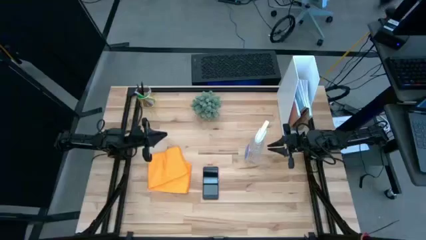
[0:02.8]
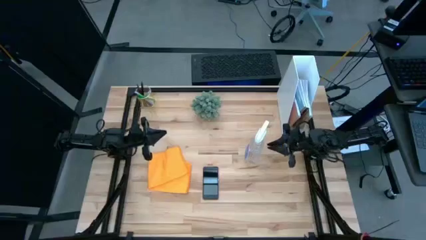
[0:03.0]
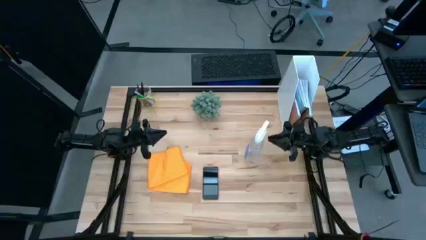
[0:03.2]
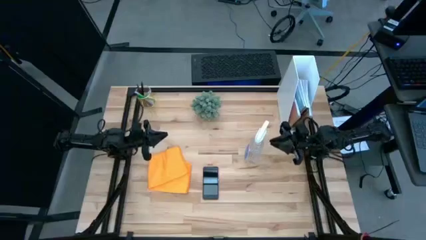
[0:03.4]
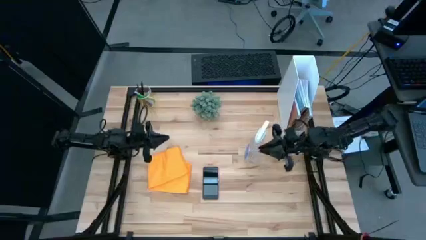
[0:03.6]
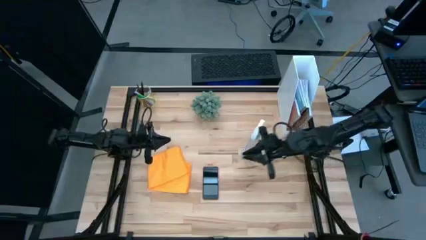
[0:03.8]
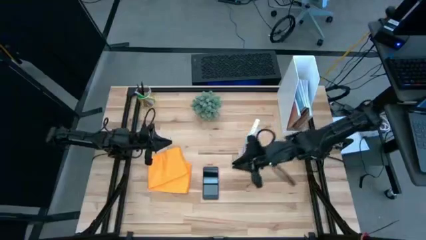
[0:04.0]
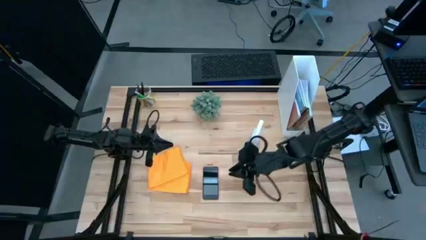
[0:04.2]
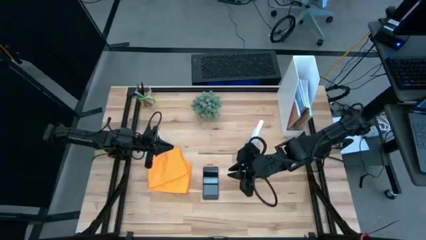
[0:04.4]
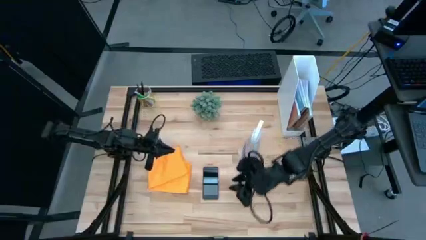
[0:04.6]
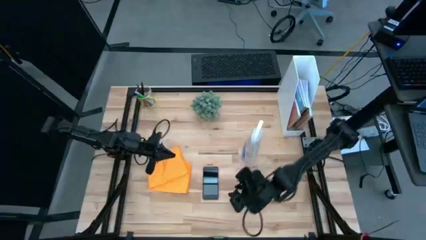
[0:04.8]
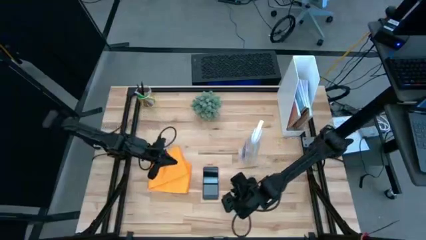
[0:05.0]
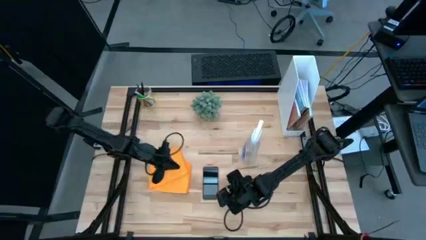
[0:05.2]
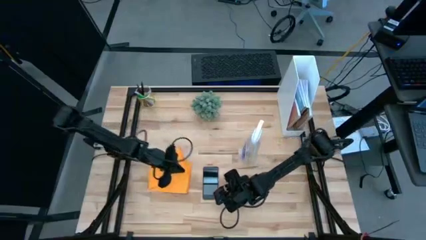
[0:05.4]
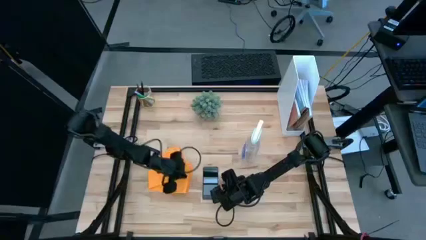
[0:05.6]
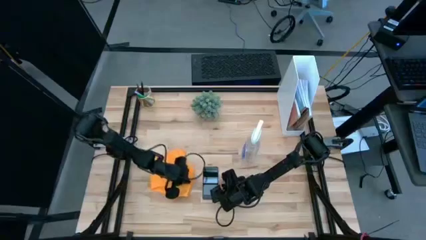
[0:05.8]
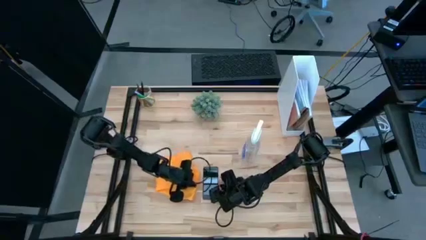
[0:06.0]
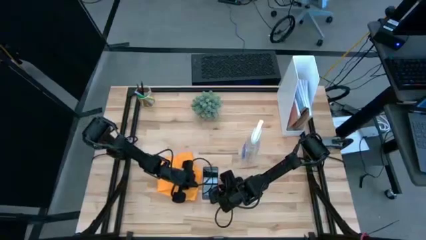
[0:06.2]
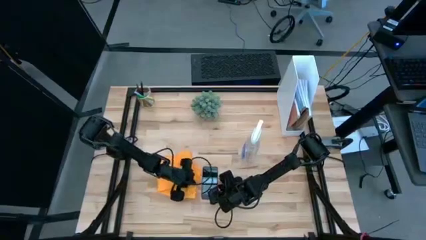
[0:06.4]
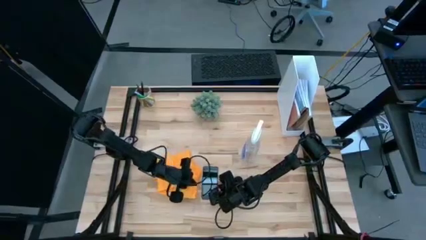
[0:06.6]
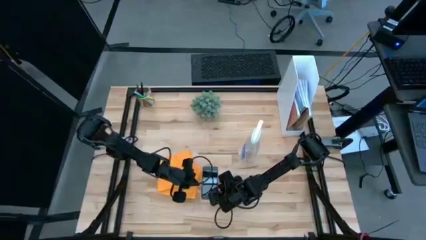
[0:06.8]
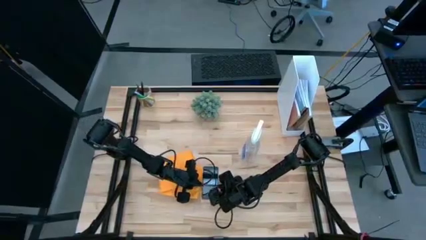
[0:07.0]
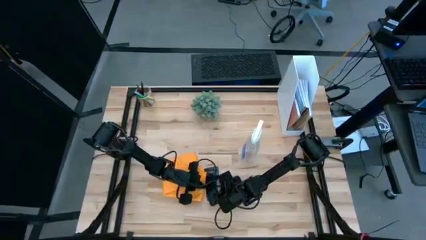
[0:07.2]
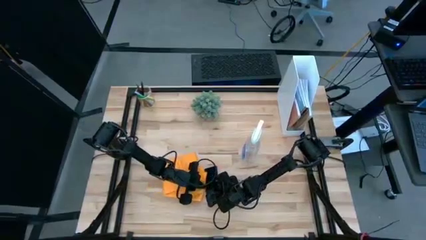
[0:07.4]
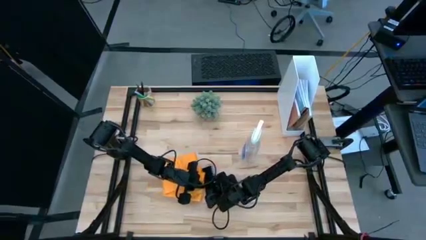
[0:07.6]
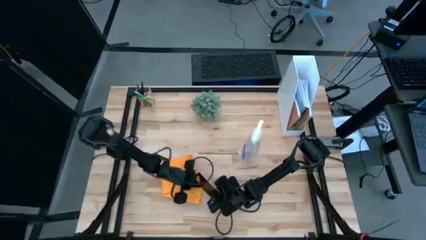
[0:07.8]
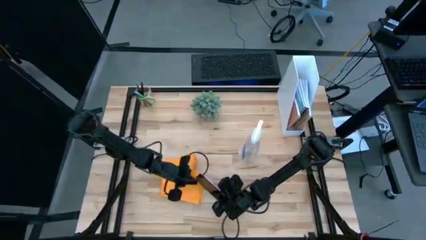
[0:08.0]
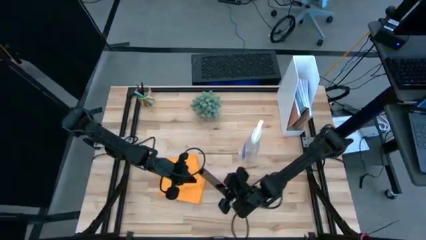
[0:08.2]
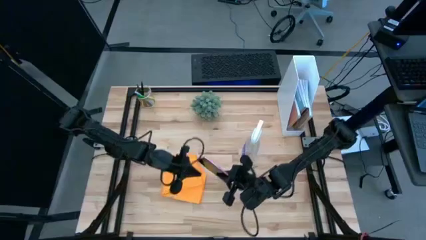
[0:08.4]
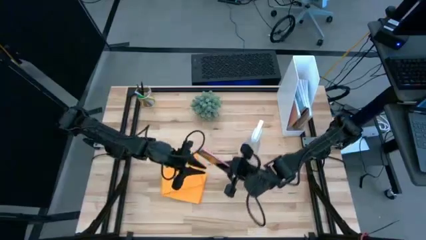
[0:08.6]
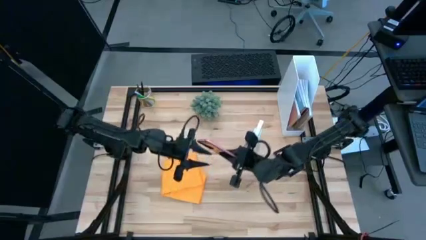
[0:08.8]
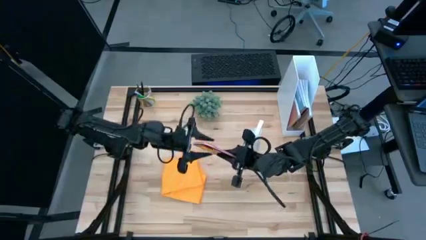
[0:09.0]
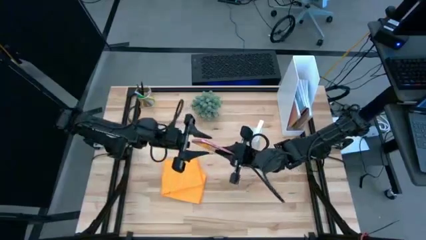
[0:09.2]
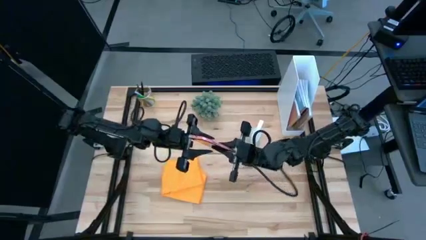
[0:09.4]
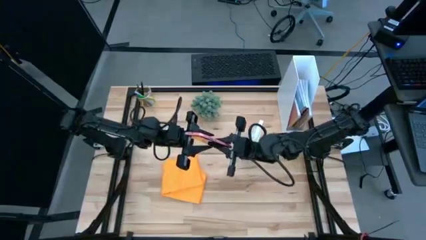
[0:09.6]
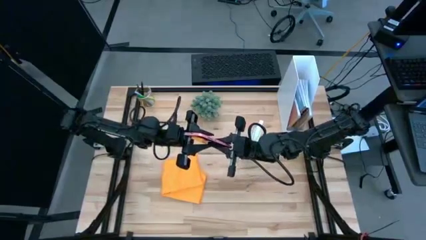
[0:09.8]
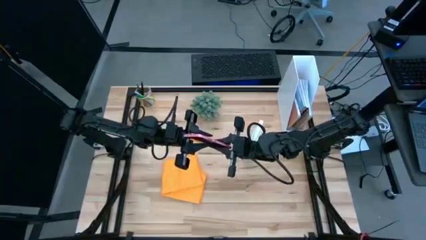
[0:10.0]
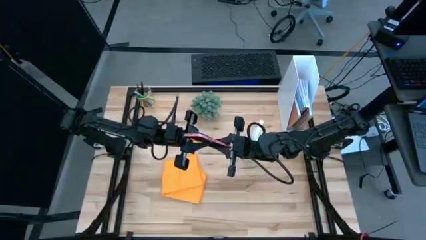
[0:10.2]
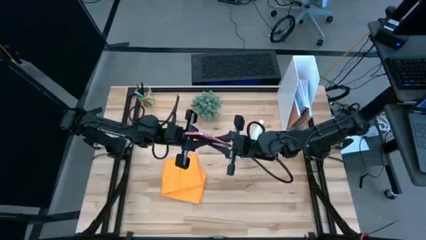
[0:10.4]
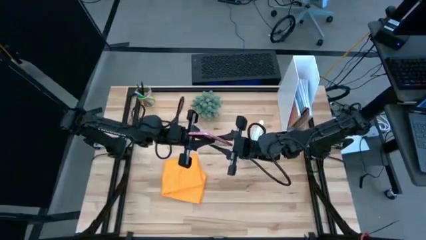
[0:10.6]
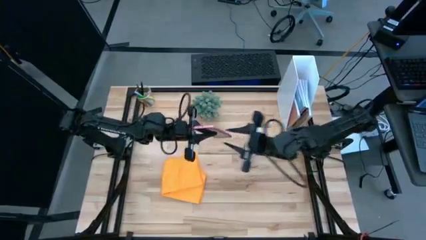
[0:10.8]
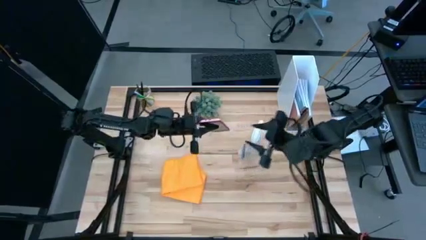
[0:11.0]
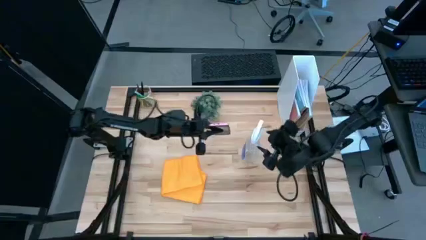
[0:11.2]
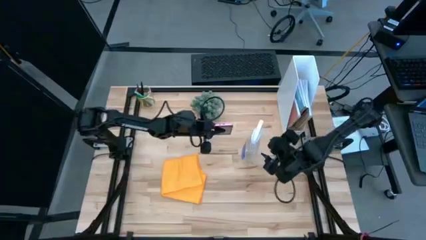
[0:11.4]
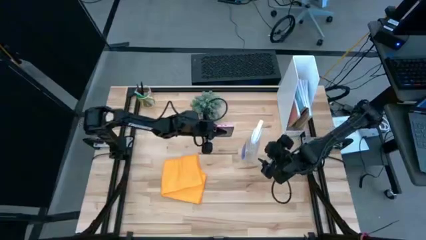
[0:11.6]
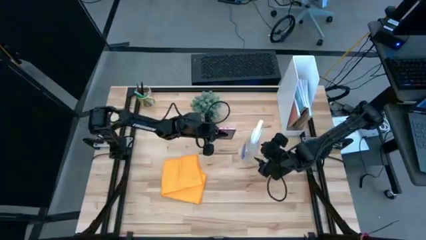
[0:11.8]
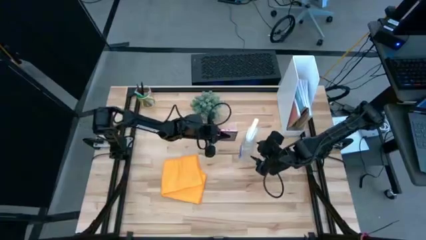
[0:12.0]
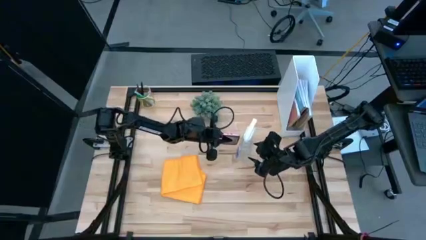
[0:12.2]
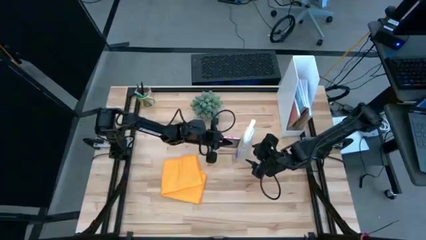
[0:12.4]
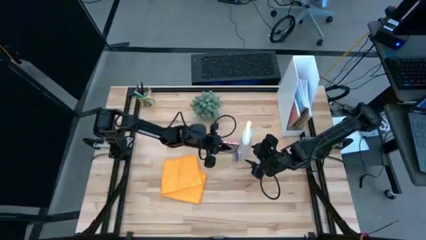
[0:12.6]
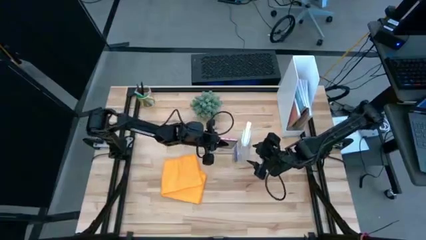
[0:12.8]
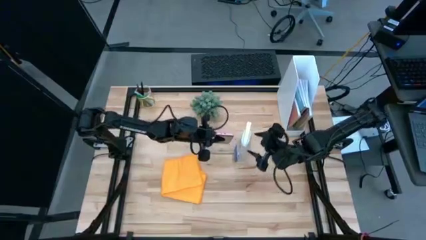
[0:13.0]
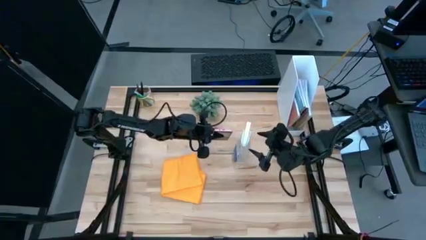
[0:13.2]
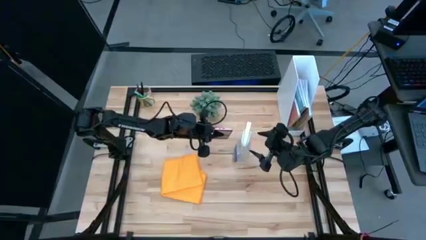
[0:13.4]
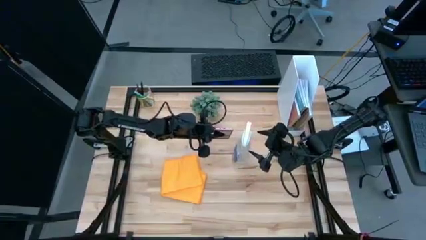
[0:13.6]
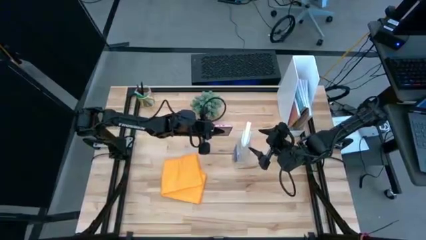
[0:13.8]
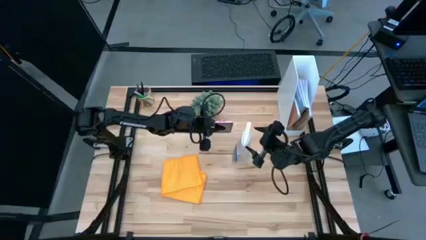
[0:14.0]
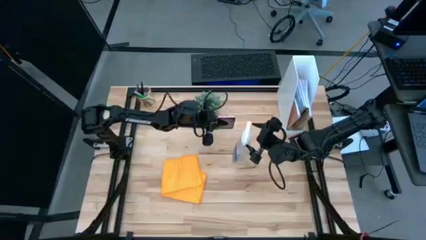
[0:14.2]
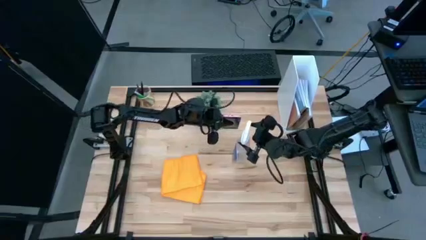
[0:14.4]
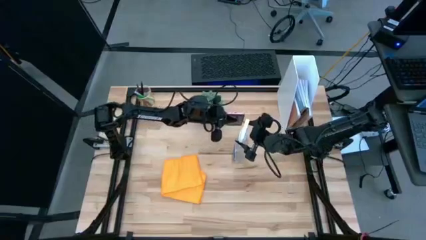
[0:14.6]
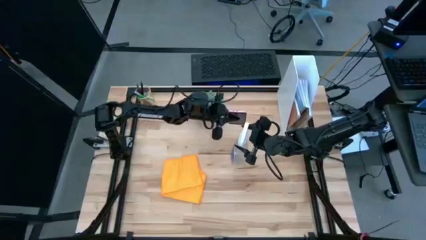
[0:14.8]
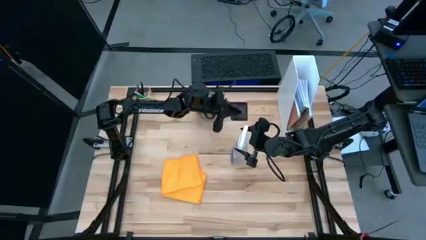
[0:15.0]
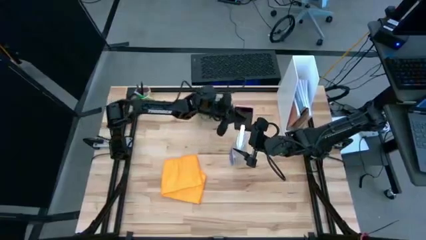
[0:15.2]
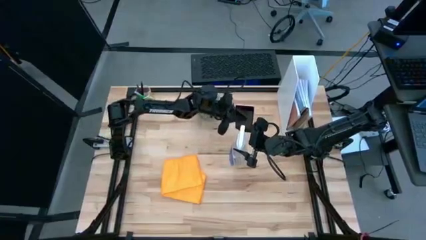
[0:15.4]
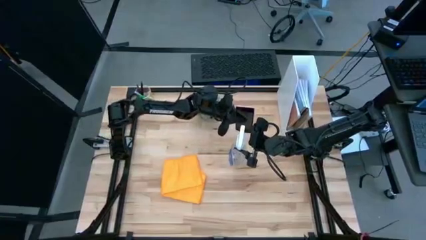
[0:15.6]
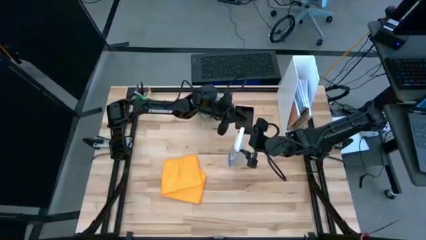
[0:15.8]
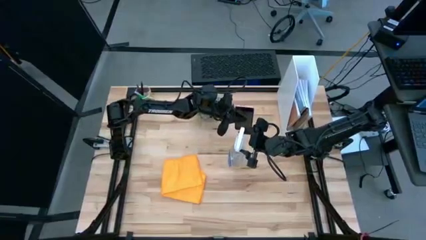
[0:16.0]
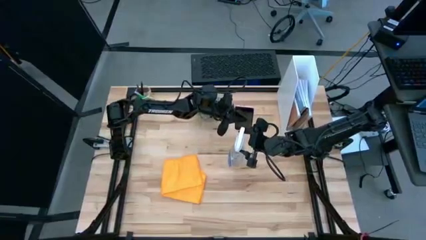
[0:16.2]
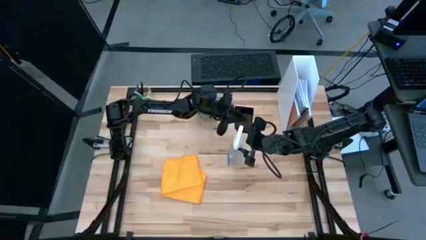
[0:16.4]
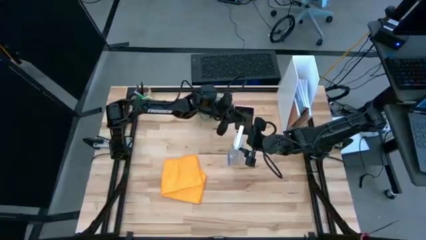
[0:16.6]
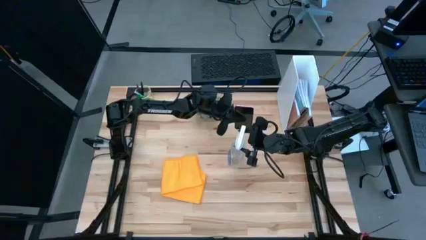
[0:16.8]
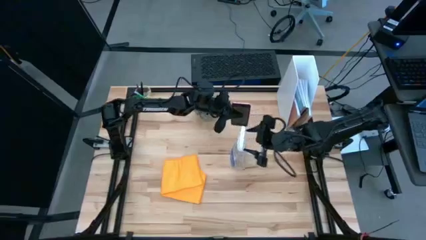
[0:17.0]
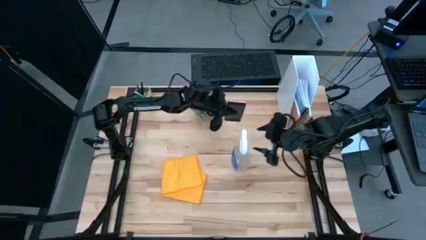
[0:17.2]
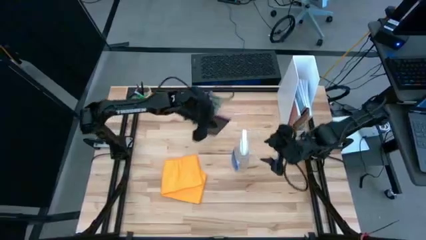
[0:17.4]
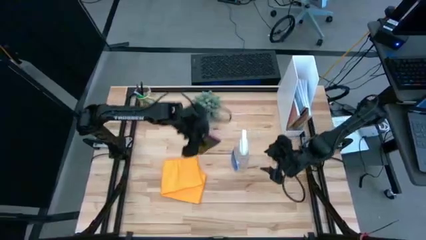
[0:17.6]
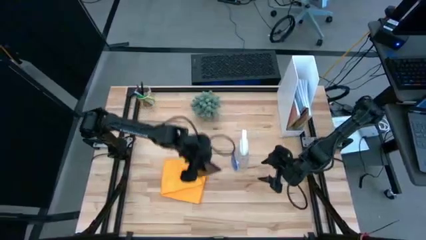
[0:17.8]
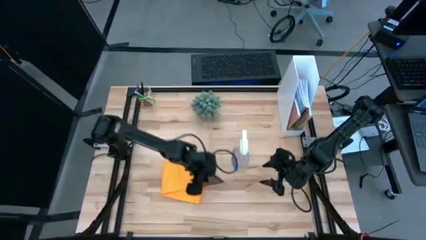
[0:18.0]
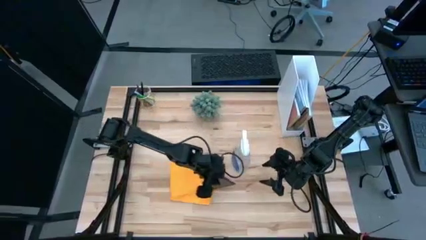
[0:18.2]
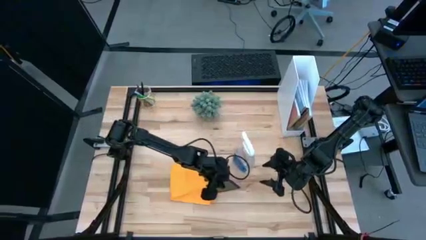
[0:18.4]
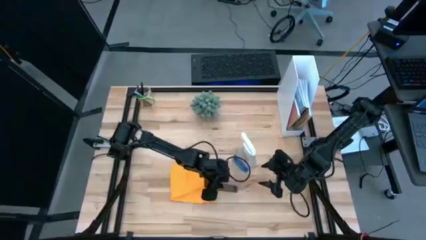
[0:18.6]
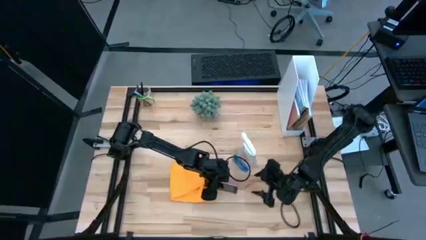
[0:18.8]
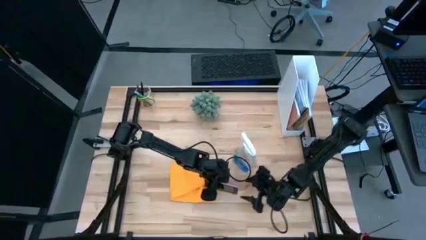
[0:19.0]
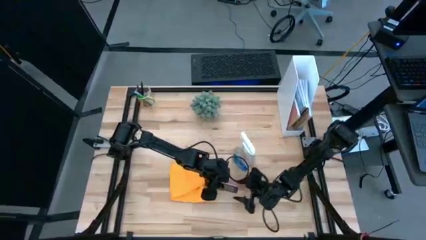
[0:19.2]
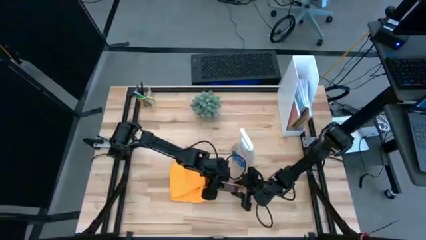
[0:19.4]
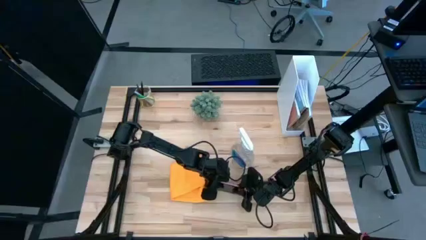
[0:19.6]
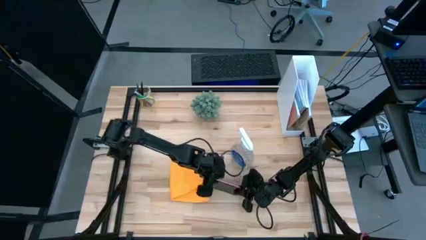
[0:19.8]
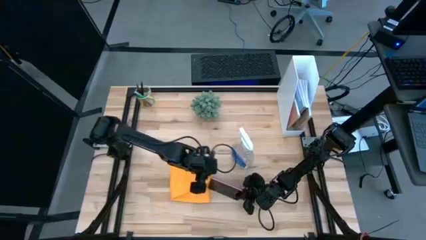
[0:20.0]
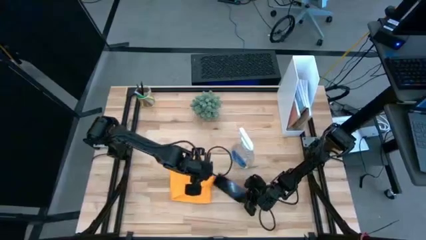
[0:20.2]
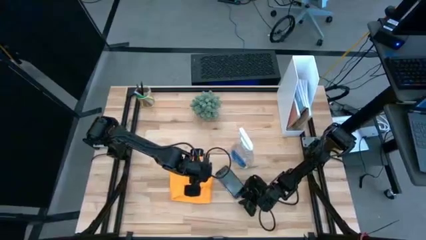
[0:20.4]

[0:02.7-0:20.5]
Task: Apply microfiber cloth
Spray the pink cellphone using the transparent spray bottle
